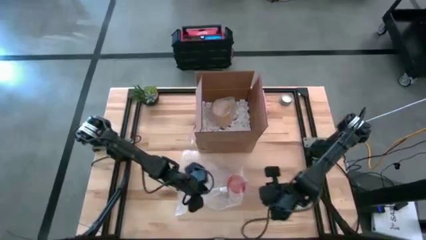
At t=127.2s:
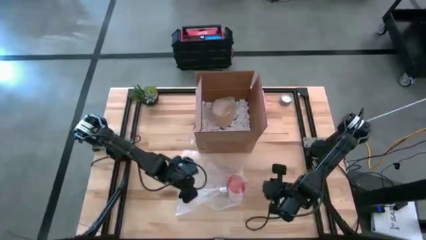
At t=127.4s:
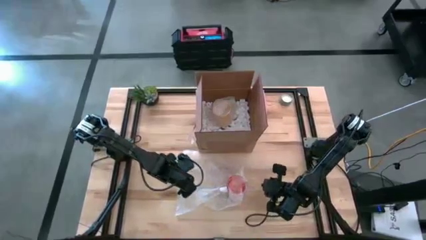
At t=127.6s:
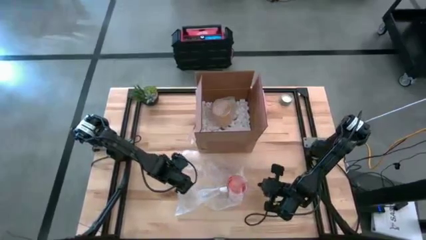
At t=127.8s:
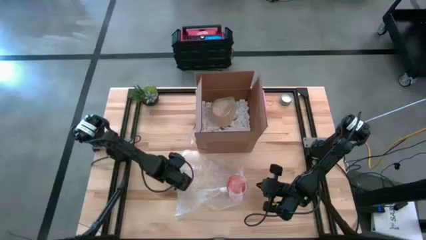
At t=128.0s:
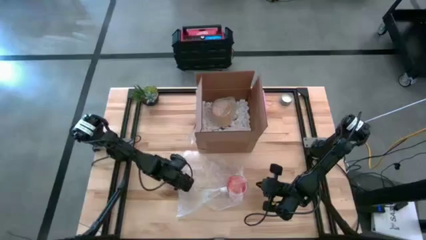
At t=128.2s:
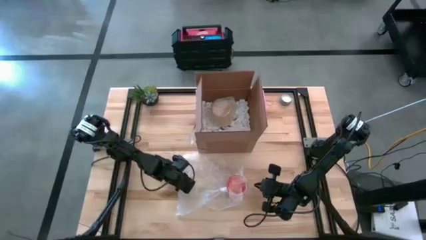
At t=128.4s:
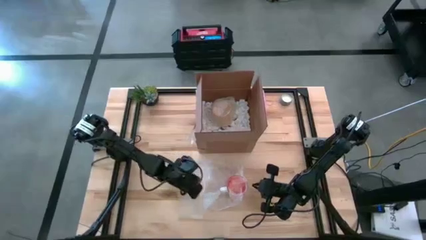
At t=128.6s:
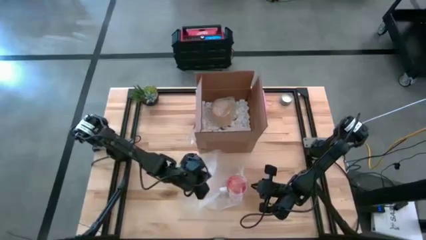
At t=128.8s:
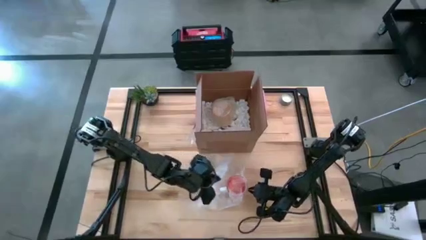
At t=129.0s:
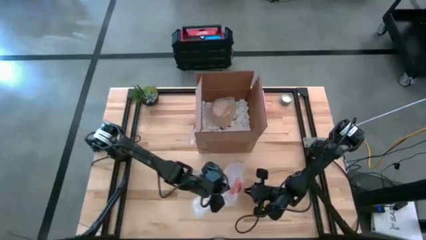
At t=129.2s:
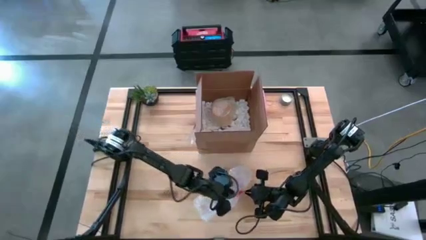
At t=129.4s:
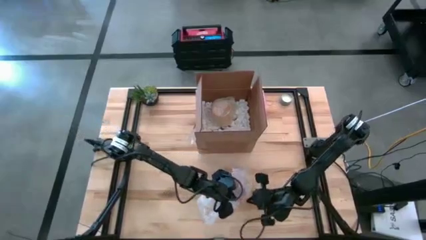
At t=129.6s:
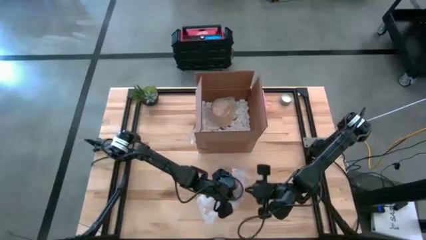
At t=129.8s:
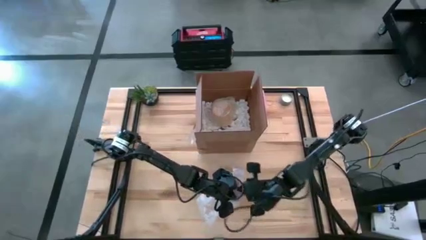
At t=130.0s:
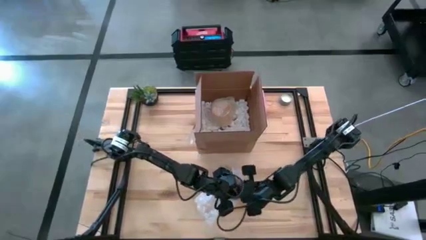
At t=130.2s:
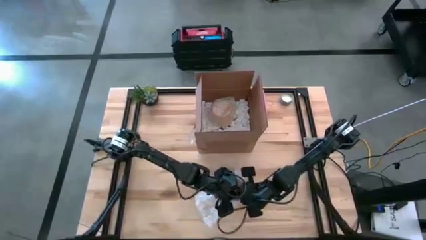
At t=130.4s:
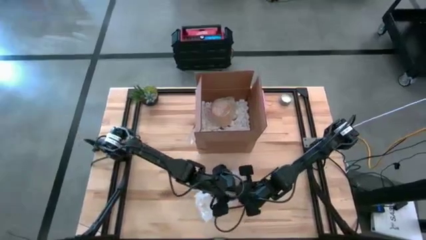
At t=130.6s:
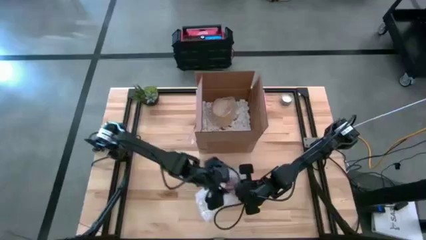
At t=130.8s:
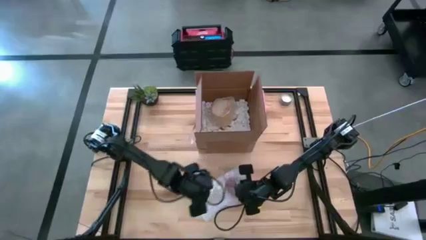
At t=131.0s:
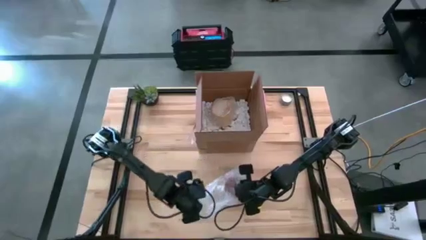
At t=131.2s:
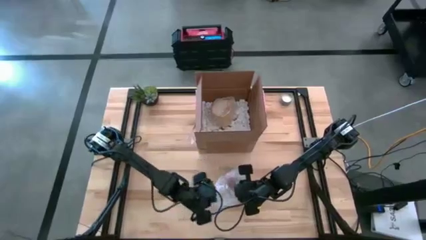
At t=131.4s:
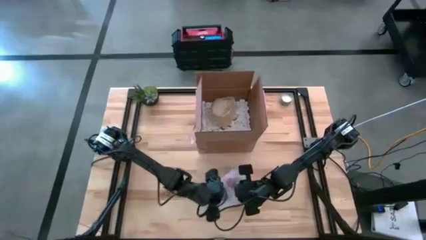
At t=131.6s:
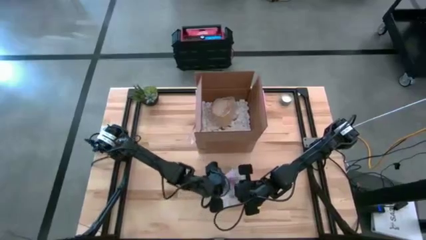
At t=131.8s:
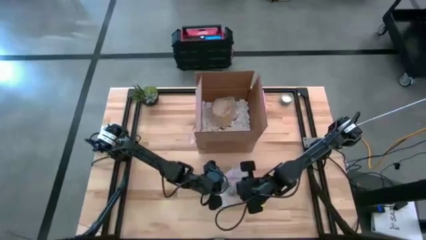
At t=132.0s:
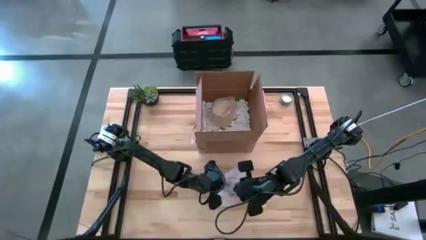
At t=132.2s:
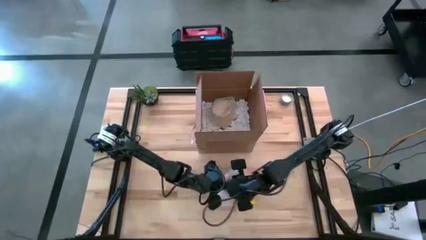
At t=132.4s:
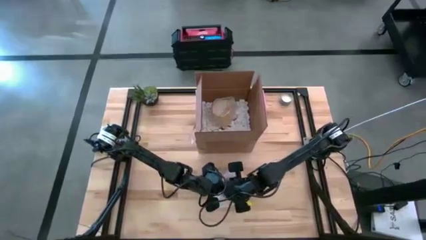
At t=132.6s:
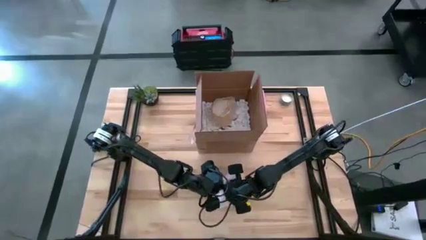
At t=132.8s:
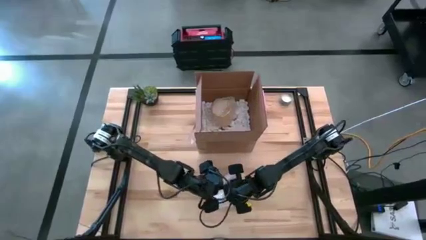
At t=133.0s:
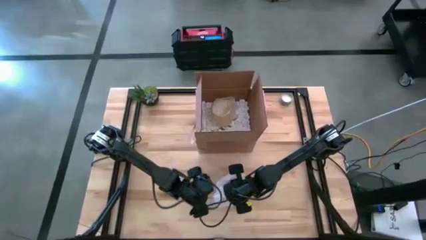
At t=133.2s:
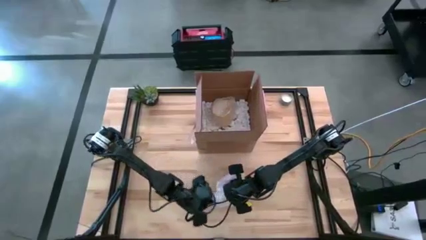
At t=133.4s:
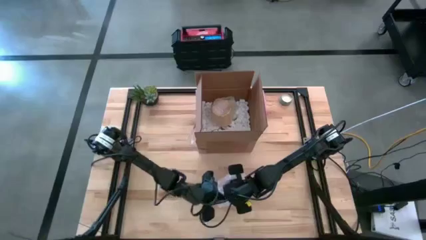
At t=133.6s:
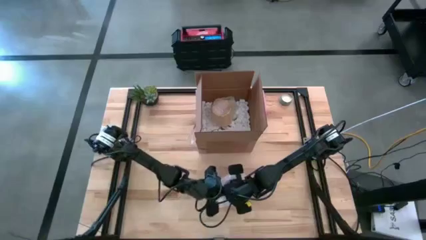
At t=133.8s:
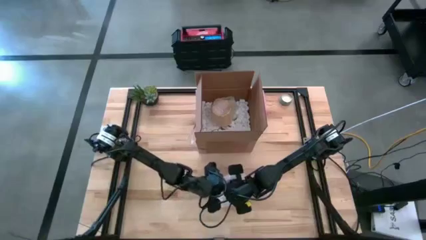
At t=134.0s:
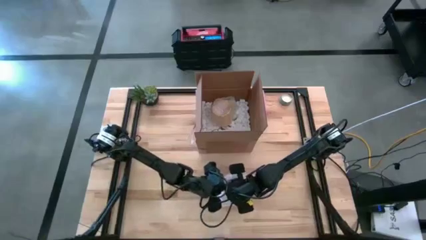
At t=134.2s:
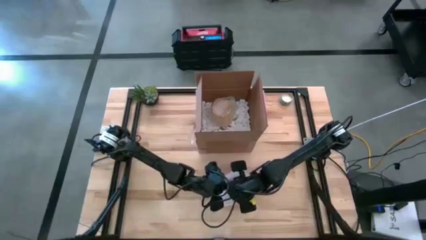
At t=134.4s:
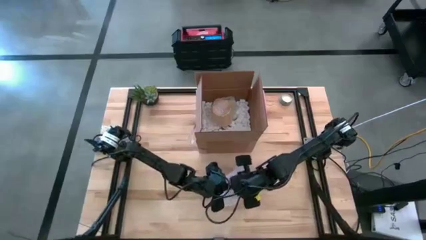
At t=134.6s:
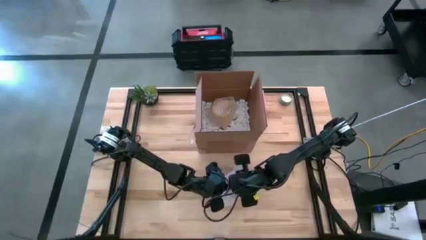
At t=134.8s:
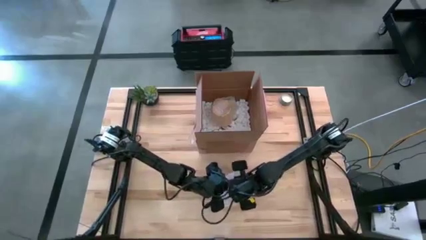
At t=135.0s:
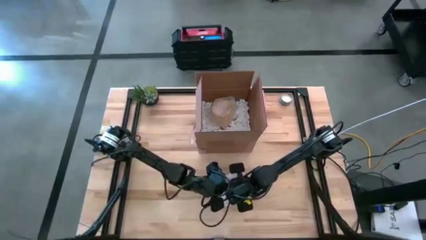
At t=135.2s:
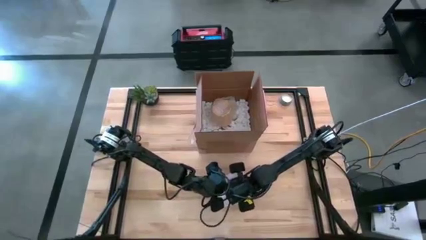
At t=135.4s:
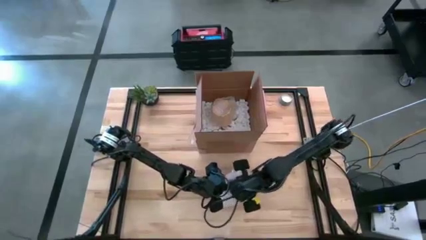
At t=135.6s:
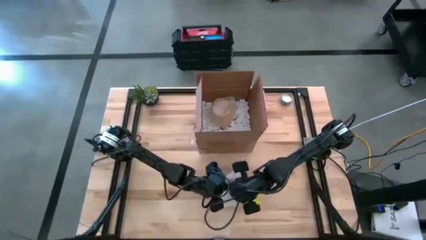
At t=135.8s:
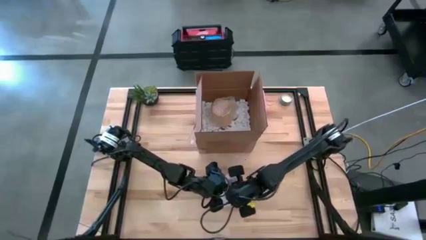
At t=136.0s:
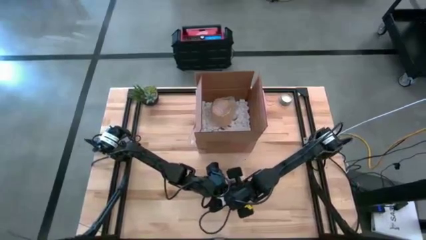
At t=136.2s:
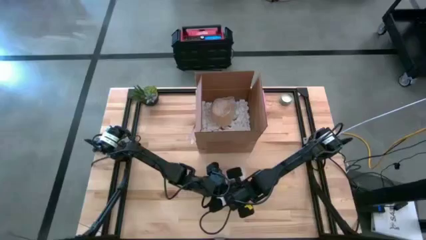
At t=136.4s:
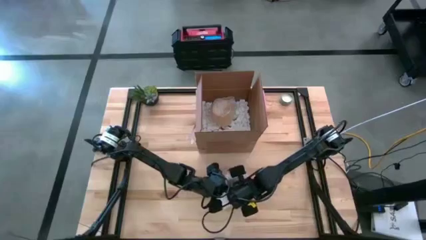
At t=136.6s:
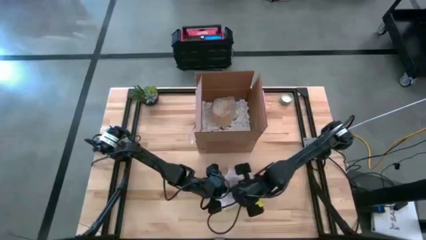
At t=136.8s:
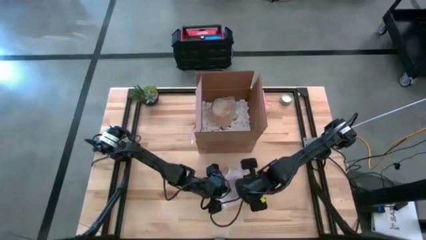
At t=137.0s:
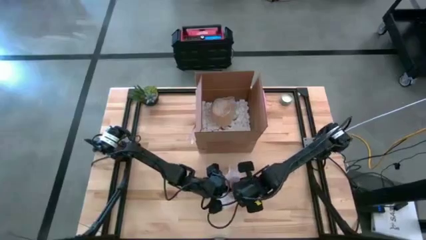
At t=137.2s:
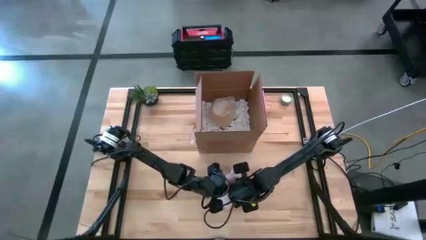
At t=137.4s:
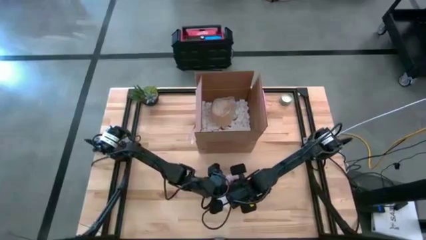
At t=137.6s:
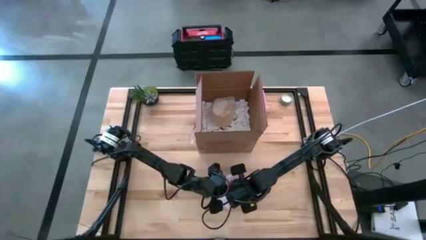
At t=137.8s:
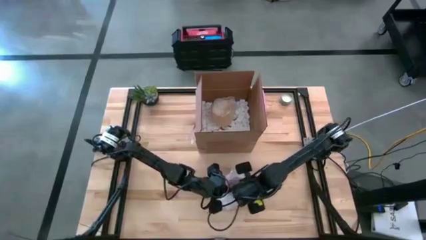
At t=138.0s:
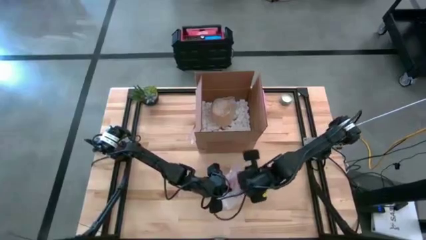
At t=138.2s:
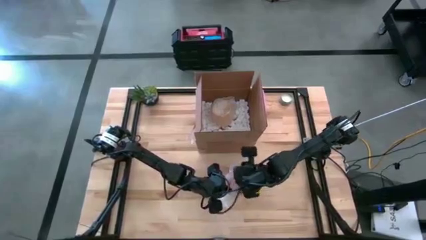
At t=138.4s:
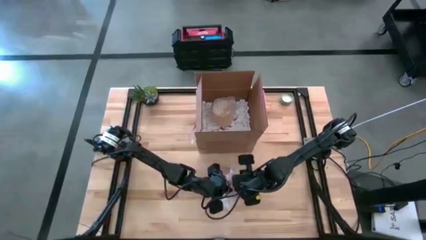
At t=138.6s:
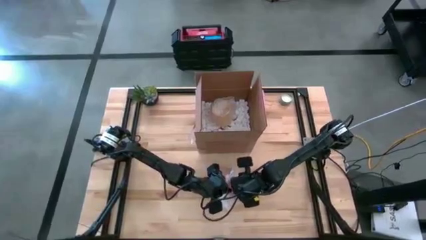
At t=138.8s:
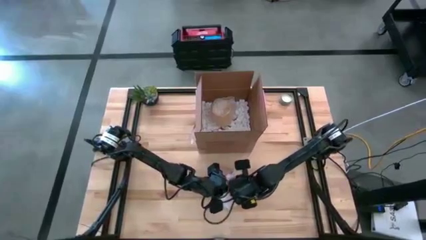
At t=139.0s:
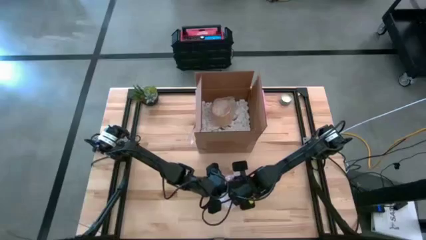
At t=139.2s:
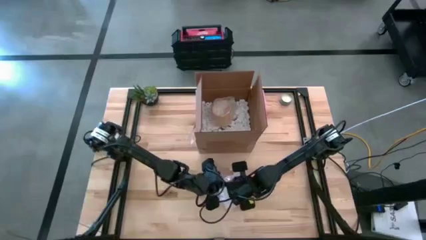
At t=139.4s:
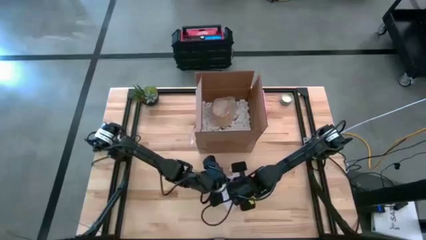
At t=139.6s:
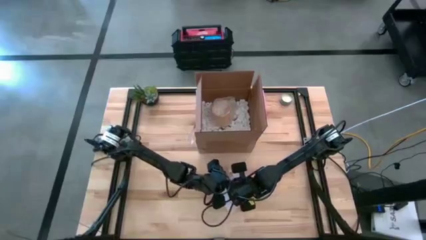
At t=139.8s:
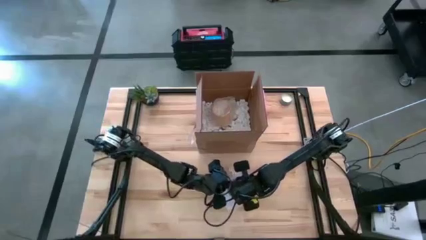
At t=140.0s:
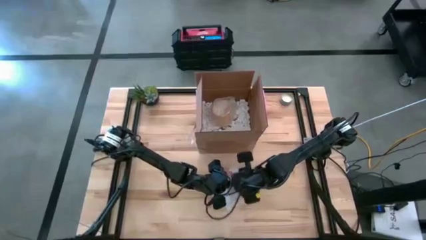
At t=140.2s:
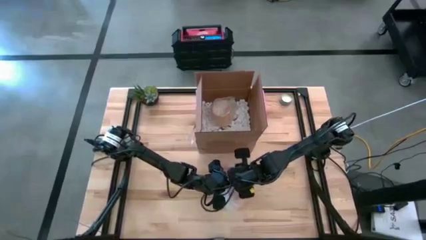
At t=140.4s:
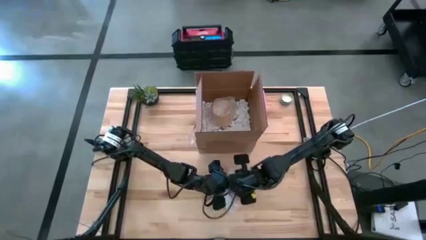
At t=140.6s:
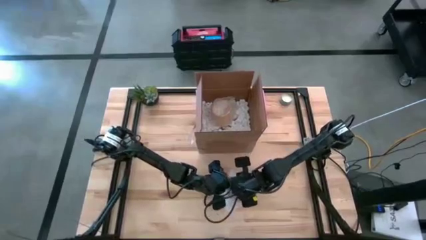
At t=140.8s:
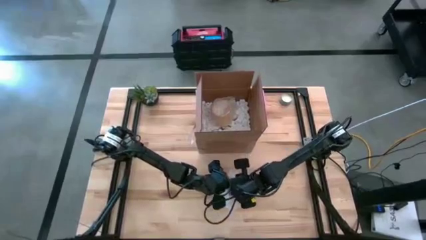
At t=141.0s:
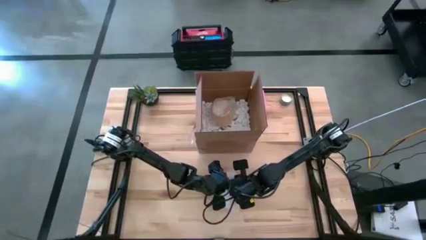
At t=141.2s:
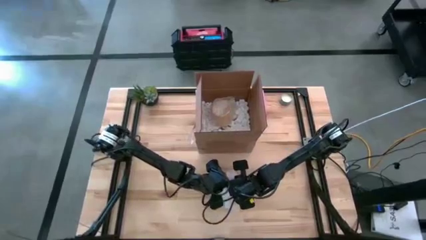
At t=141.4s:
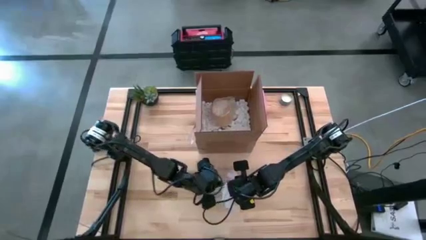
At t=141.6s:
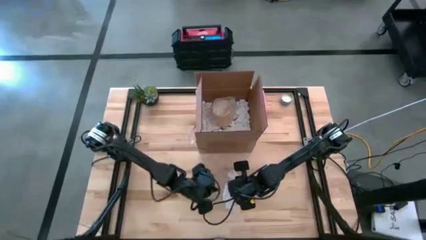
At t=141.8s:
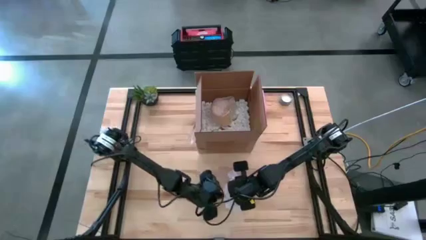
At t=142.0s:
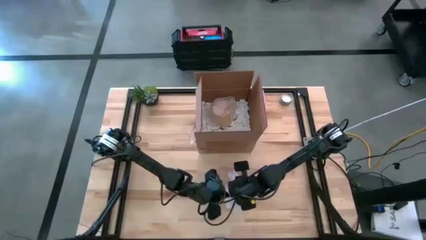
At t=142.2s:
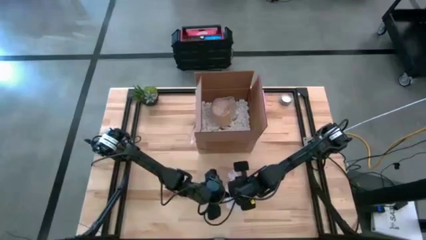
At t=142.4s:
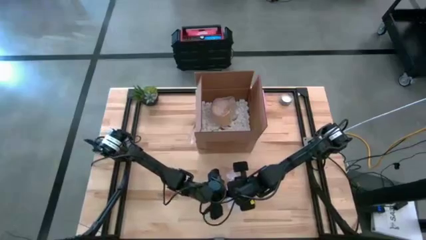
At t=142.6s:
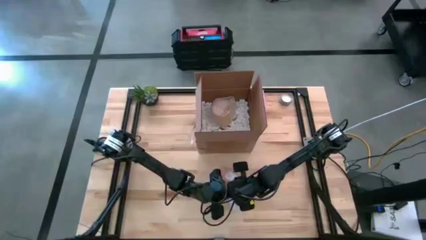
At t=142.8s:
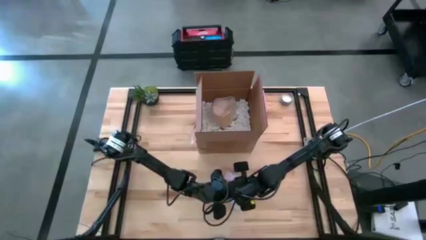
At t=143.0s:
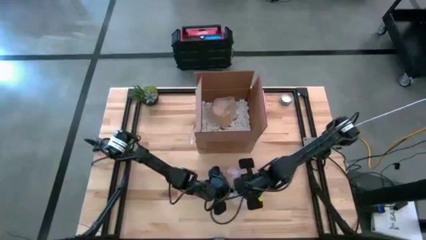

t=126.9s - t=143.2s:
Task: wrap mug
Wrap the orange mug with bubble wrap
